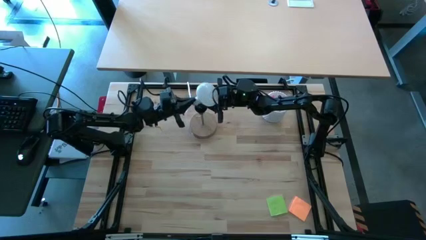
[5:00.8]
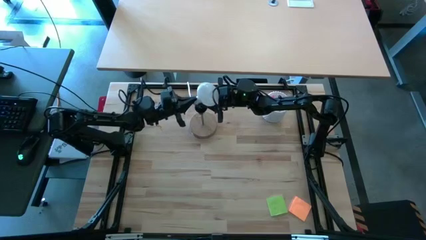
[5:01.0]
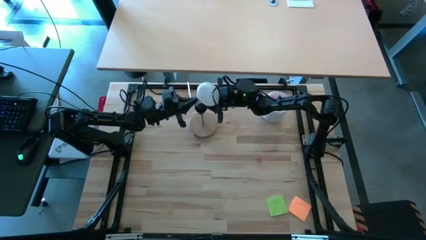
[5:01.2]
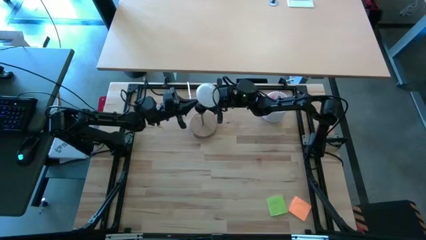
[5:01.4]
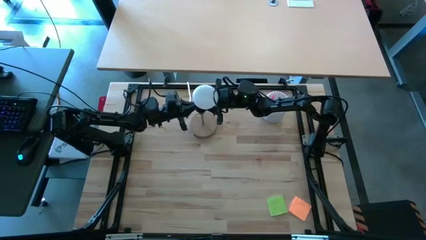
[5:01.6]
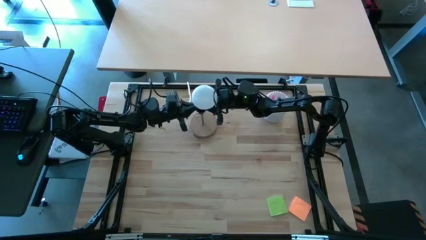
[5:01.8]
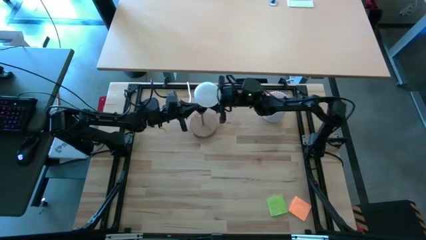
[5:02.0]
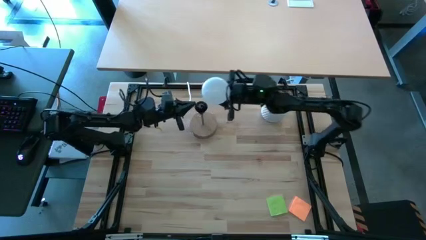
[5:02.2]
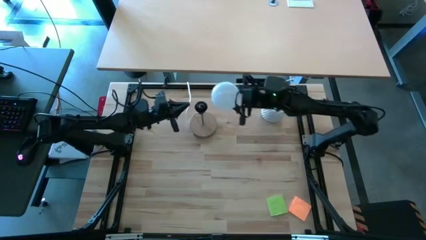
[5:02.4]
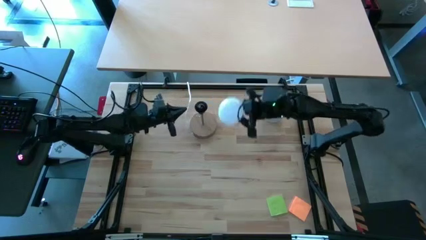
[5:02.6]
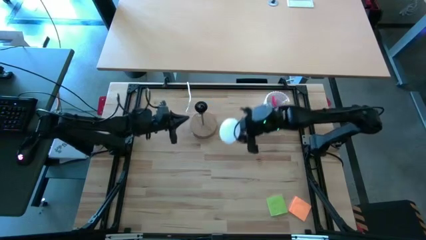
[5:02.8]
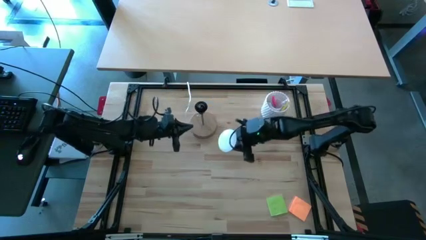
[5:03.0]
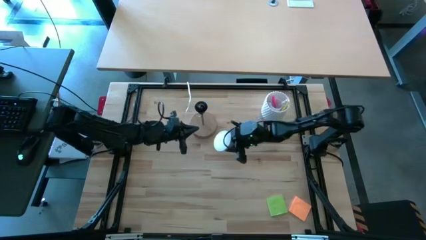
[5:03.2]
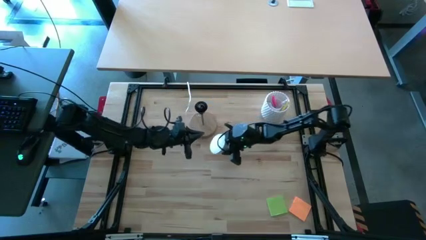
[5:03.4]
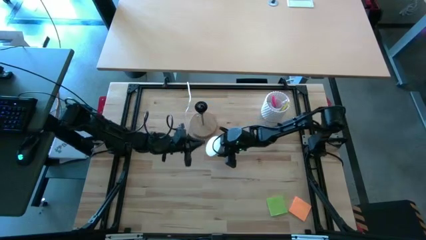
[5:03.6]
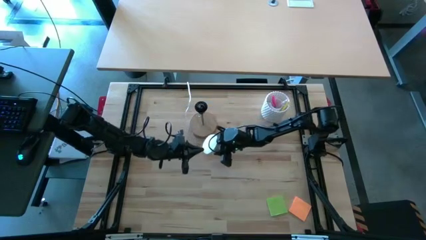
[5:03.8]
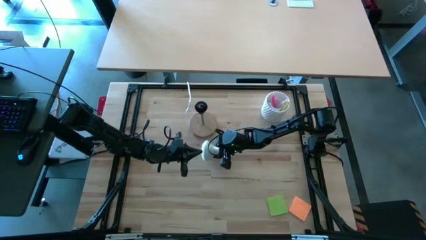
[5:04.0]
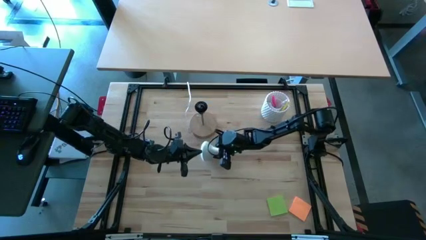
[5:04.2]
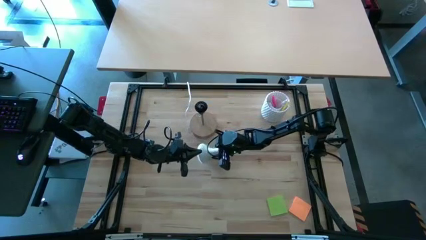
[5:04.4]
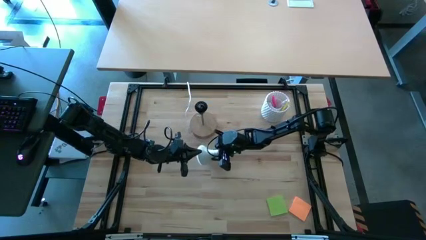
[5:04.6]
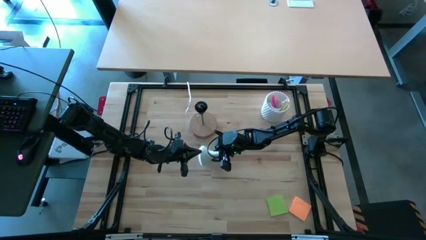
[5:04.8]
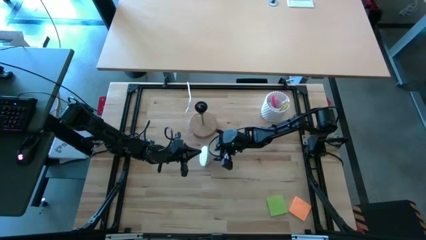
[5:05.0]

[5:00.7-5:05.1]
Task: Screw lightbulb
Put the lightbulb on the table

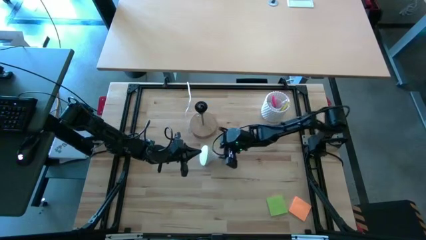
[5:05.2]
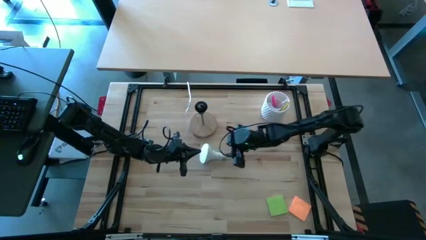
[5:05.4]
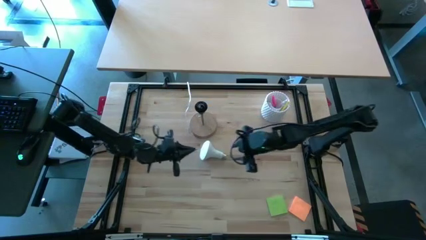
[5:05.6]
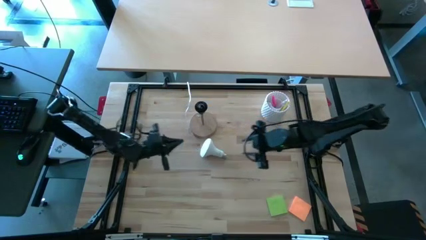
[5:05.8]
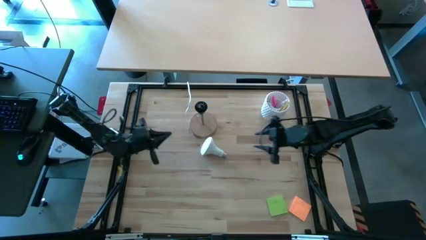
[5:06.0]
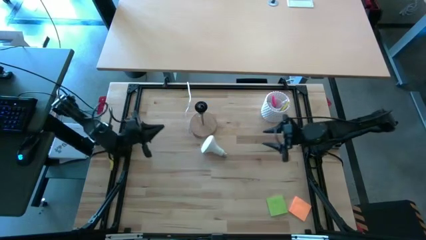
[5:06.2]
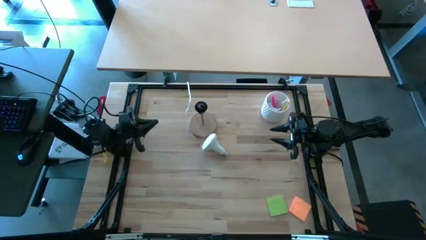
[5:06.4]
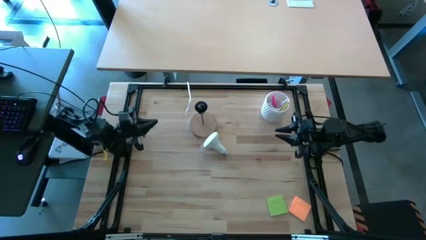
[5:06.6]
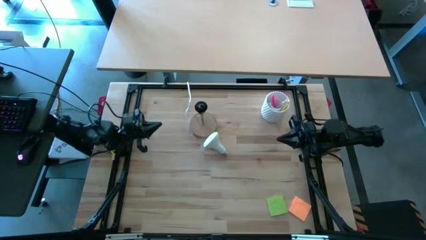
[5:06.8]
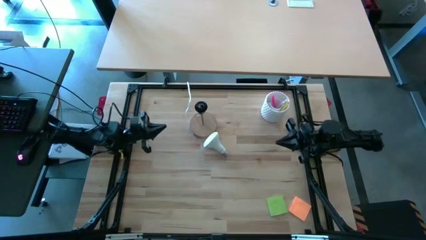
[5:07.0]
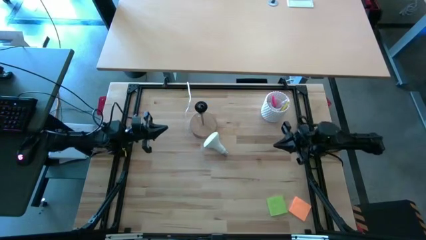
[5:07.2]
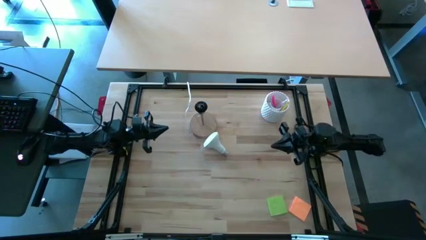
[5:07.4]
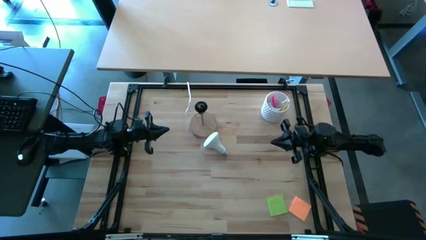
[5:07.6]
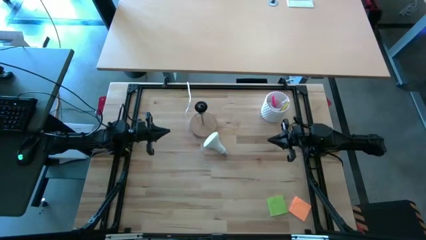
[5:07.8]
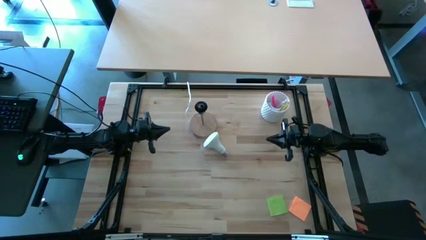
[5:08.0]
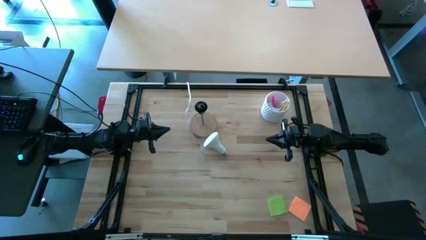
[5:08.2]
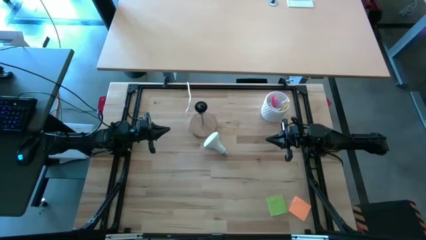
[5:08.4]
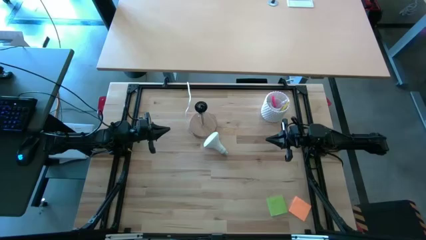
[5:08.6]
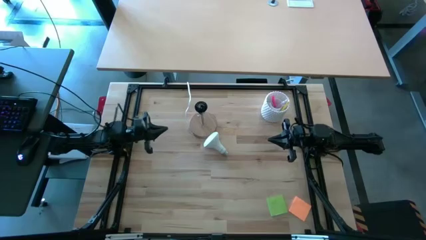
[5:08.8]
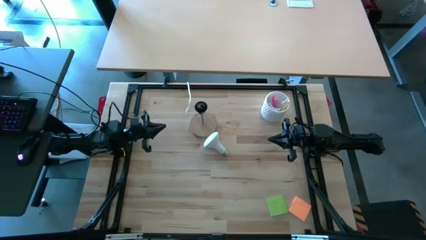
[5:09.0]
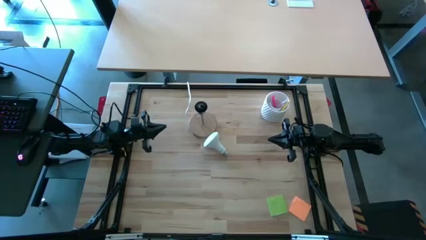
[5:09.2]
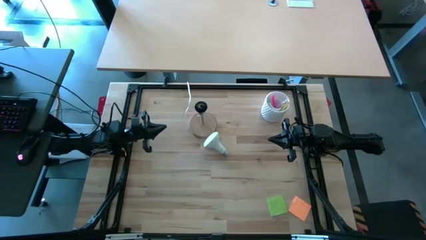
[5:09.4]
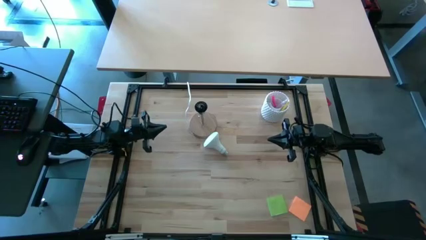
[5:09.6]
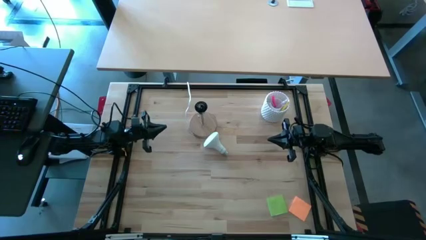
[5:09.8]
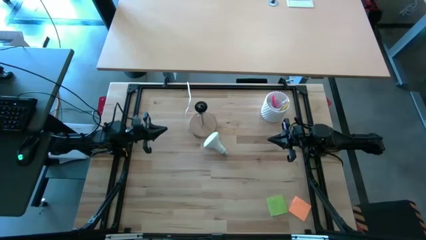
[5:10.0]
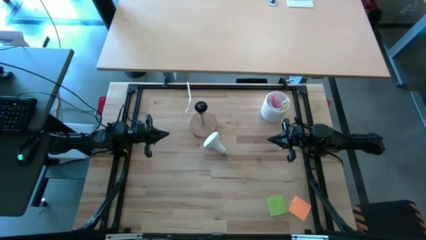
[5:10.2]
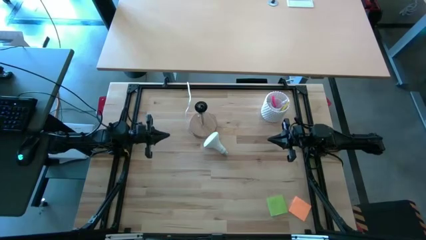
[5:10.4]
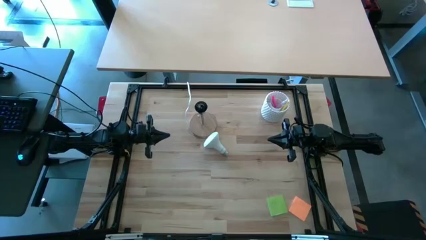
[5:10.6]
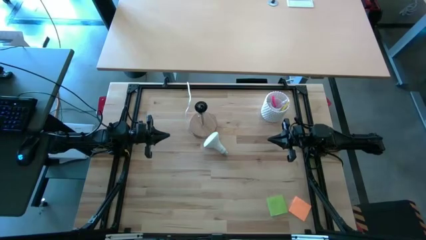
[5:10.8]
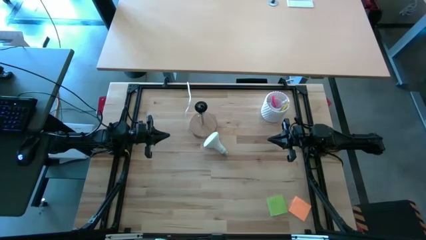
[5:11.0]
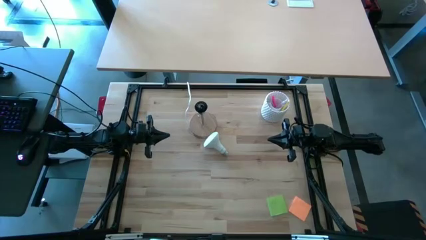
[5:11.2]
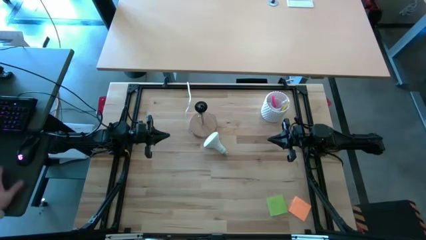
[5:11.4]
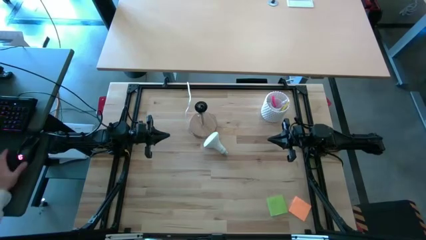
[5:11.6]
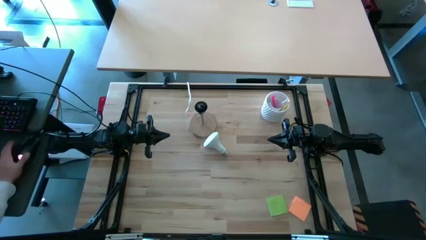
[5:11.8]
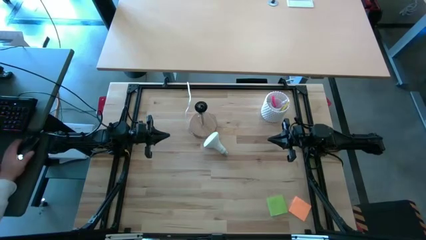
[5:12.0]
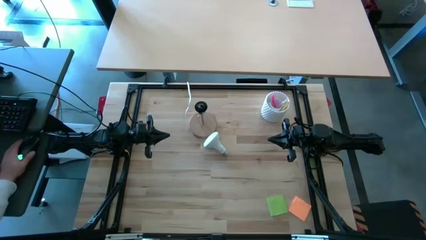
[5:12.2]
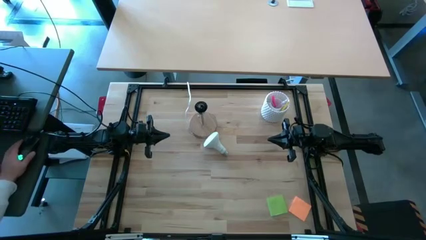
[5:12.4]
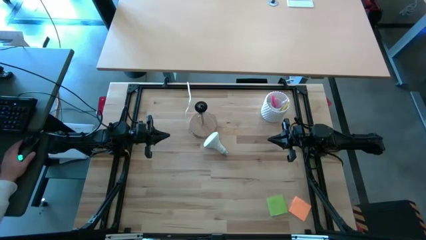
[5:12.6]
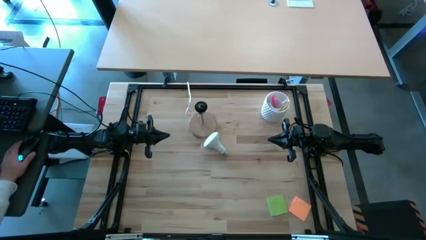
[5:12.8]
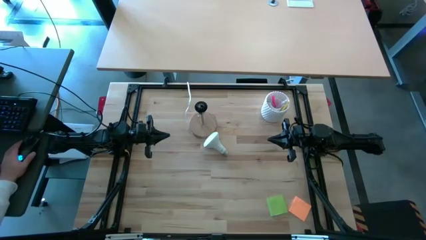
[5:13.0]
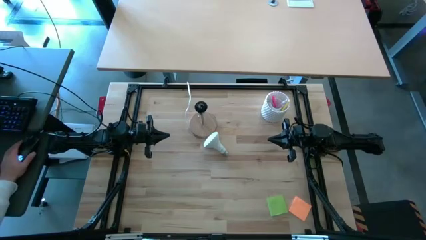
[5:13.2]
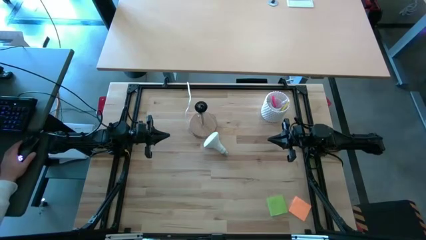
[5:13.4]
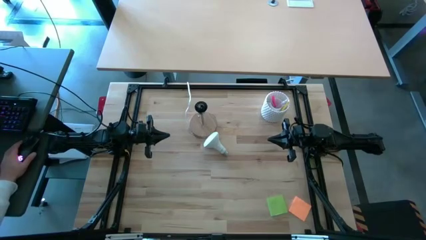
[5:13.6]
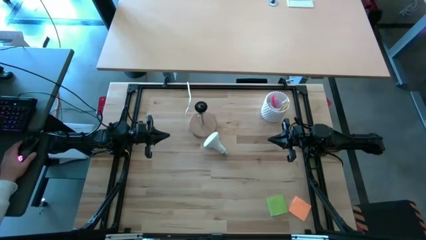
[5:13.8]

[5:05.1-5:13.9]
Return to Home Position

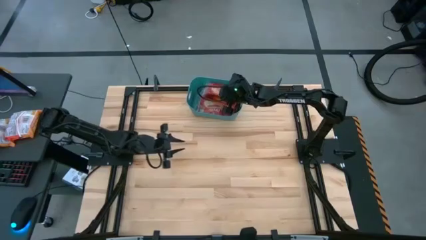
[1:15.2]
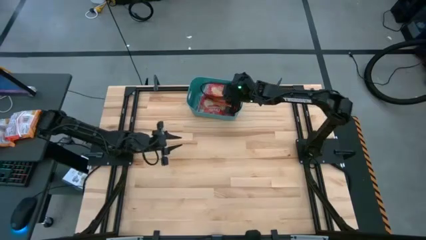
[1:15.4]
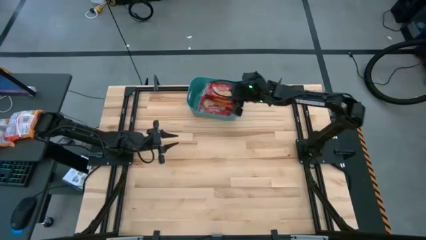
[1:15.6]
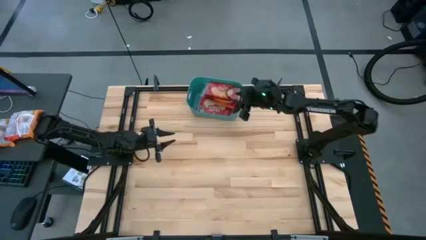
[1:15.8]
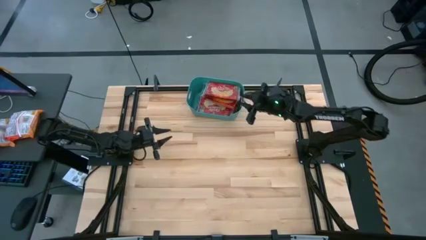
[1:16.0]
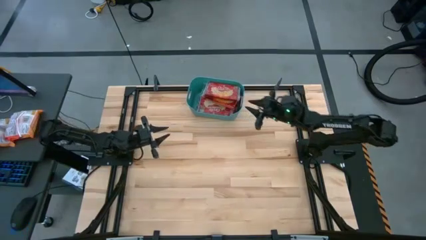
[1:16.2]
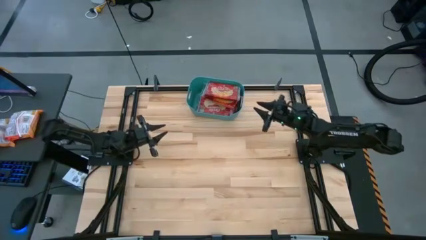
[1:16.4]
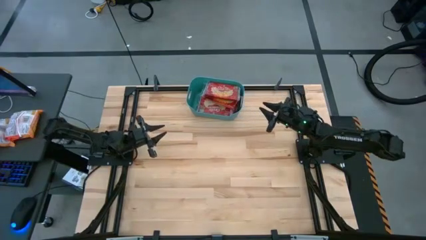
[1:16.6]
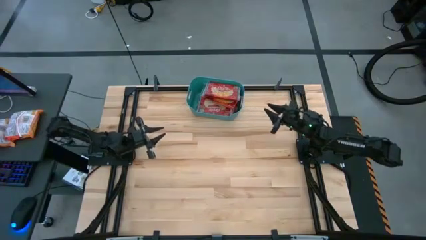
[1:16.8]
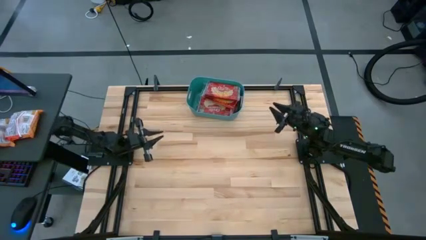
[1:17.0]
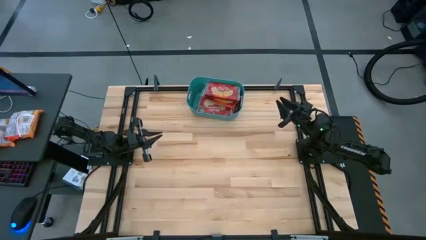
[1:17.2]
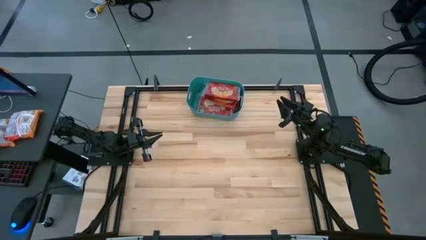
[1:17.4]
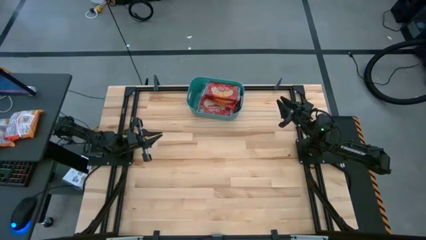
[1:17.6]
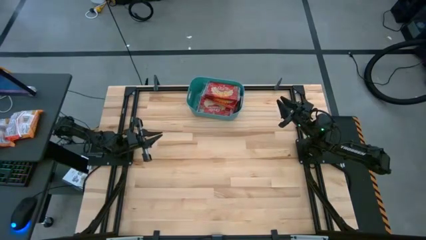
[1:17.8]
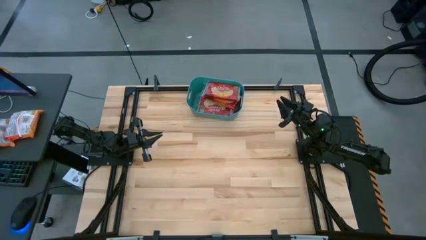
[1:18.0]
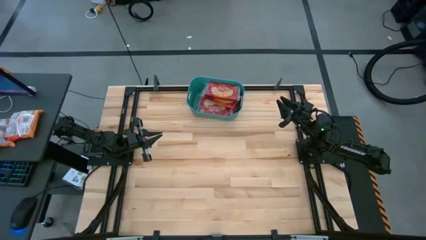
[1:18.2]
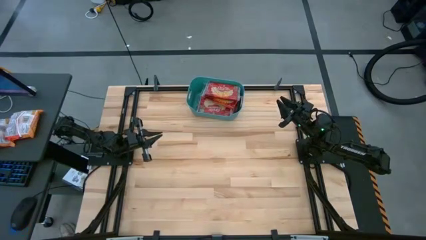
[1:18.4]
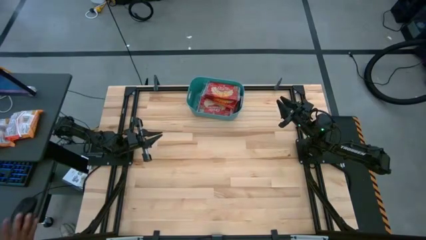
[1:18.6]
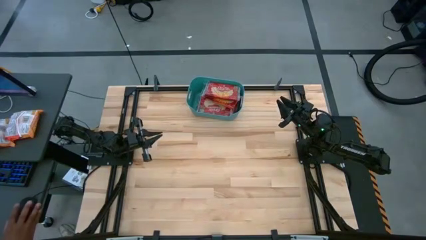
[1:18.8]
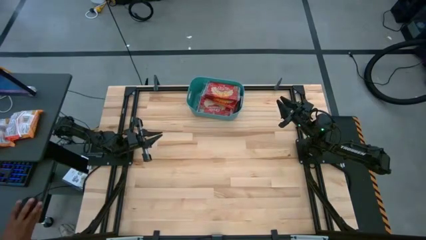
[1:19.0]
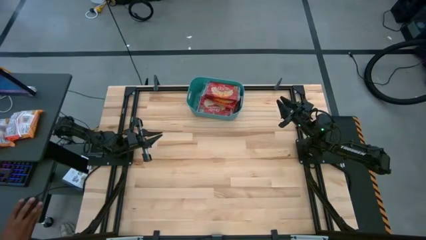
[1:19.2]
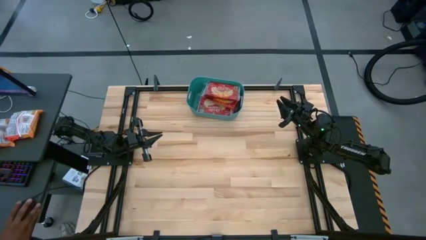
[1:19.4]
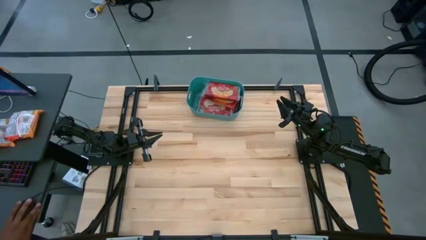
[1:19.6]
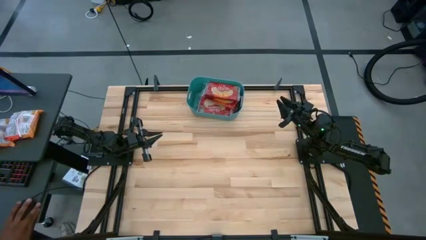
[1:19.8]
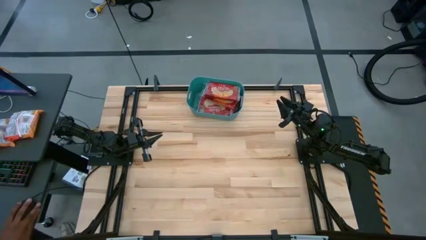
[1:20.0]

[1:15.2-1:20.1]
Task: Sort popcorn bags into baskets
Return to Home Position
